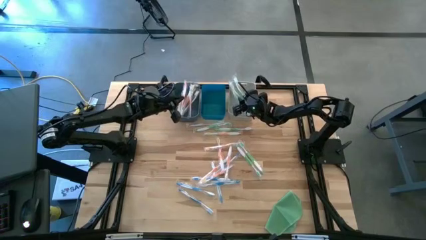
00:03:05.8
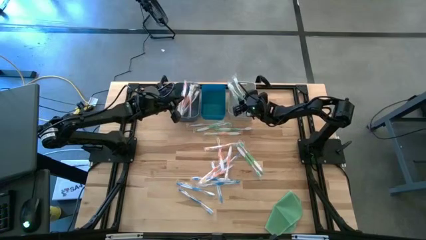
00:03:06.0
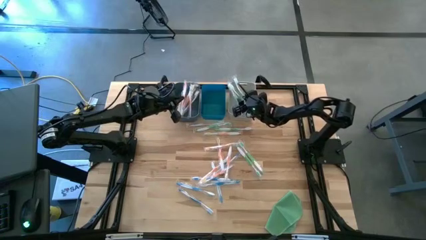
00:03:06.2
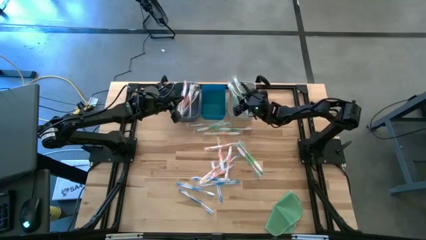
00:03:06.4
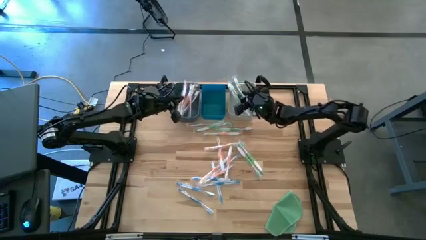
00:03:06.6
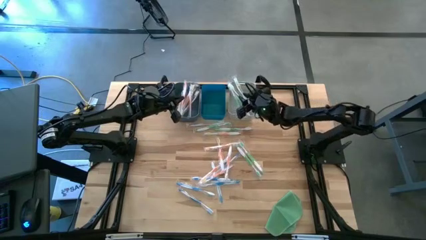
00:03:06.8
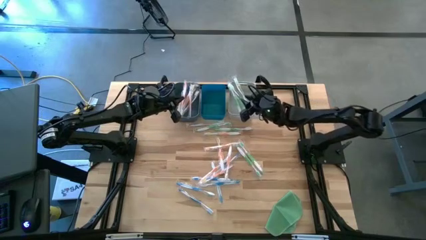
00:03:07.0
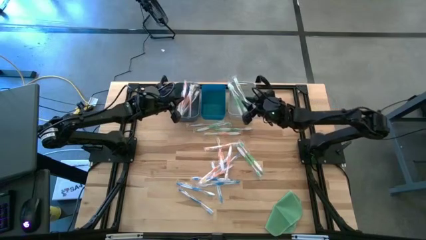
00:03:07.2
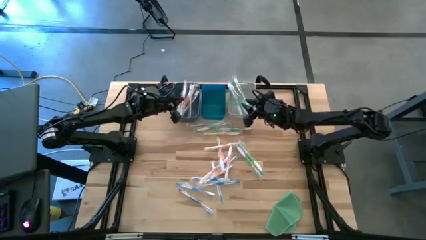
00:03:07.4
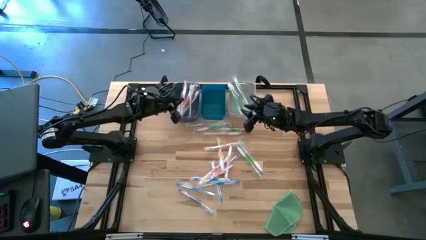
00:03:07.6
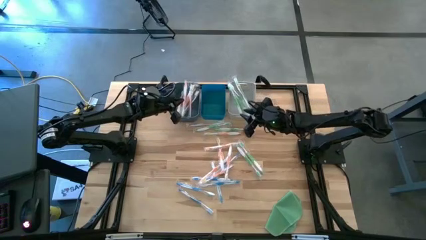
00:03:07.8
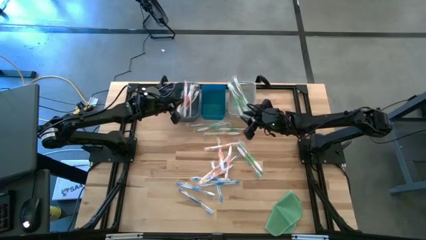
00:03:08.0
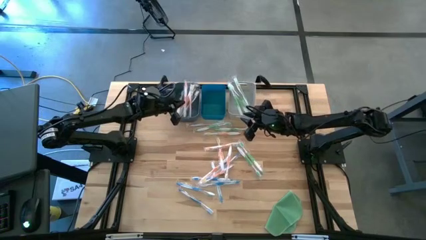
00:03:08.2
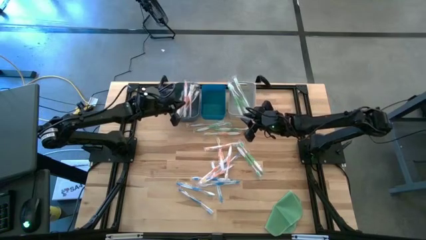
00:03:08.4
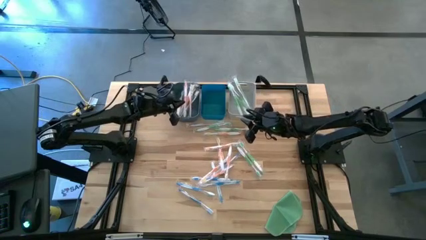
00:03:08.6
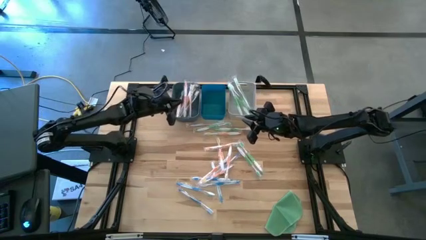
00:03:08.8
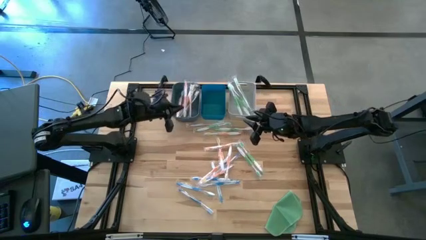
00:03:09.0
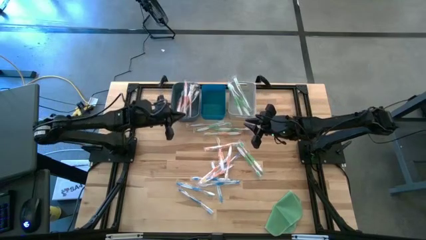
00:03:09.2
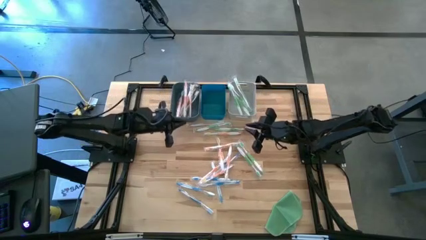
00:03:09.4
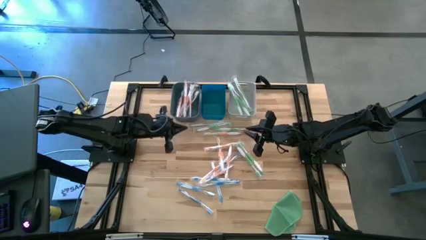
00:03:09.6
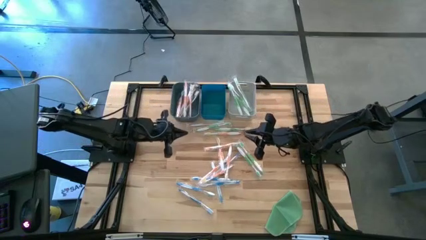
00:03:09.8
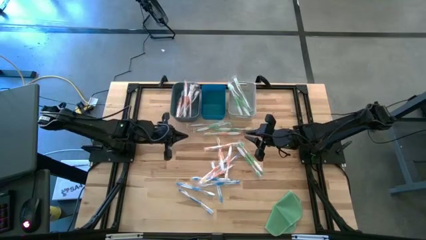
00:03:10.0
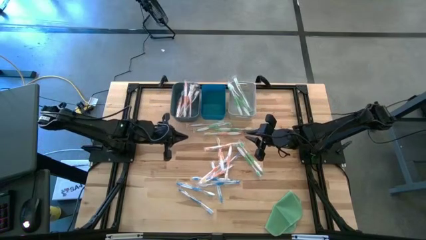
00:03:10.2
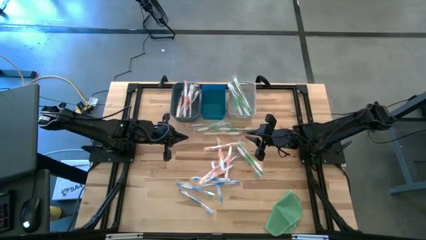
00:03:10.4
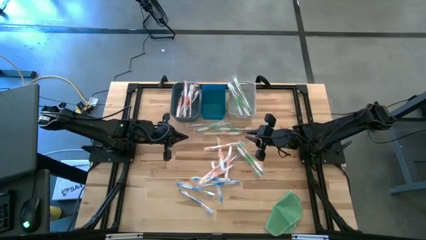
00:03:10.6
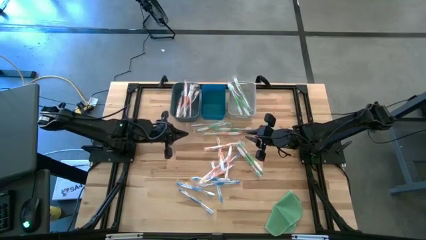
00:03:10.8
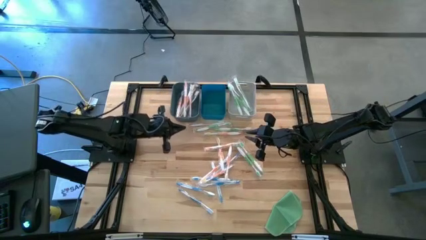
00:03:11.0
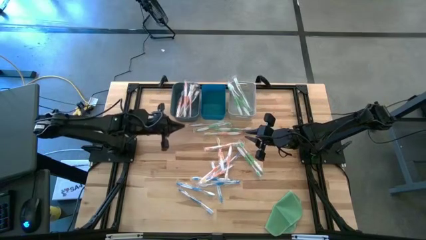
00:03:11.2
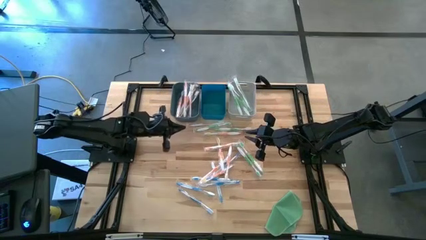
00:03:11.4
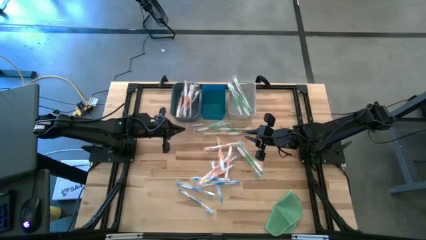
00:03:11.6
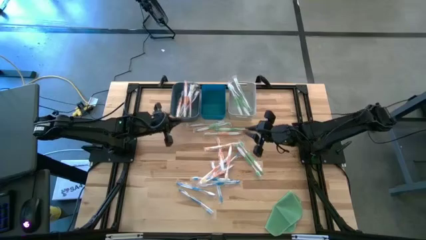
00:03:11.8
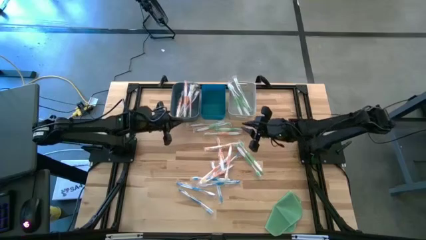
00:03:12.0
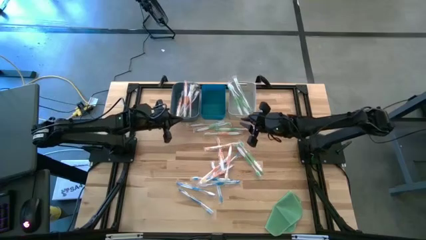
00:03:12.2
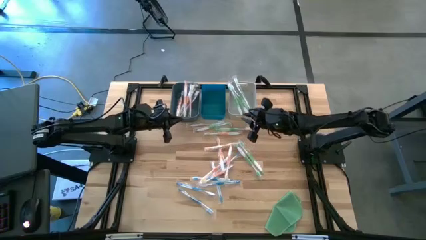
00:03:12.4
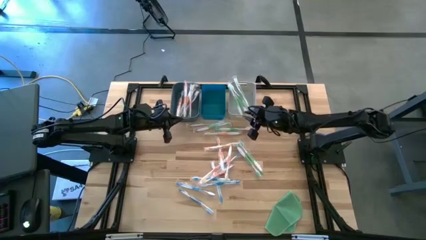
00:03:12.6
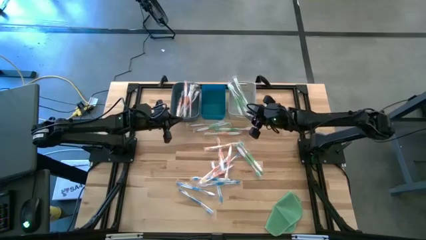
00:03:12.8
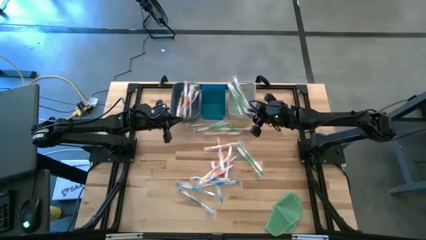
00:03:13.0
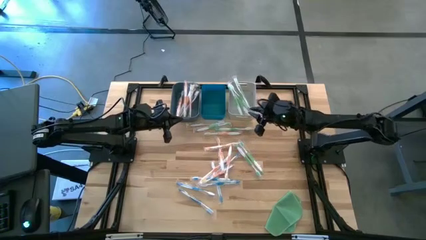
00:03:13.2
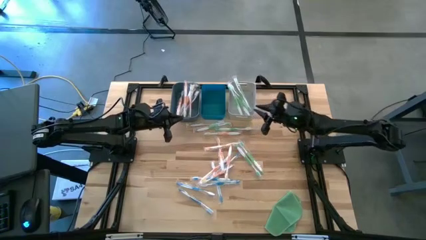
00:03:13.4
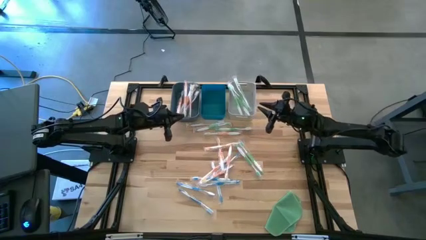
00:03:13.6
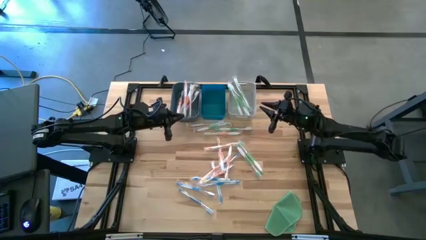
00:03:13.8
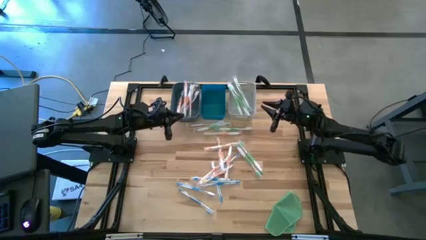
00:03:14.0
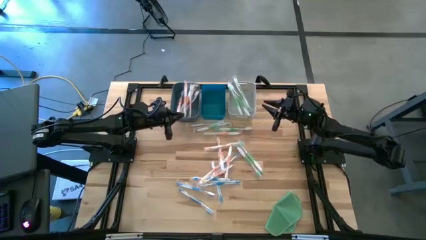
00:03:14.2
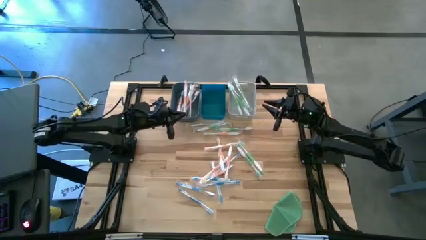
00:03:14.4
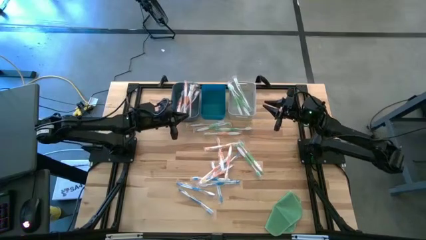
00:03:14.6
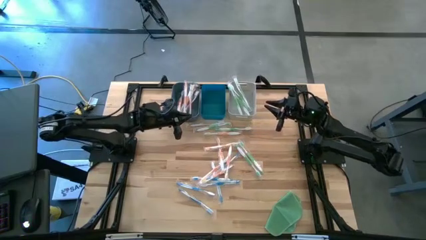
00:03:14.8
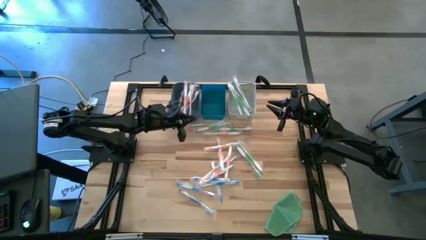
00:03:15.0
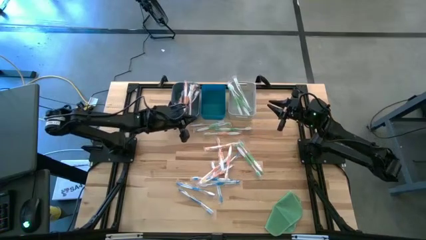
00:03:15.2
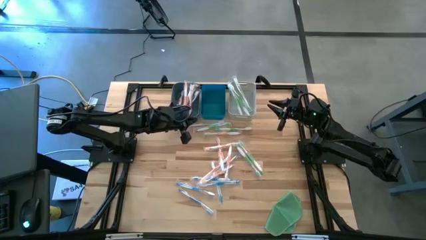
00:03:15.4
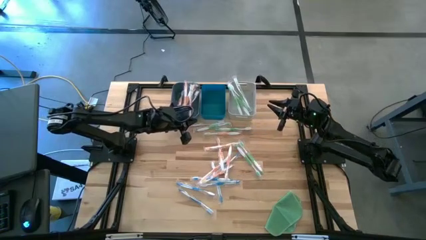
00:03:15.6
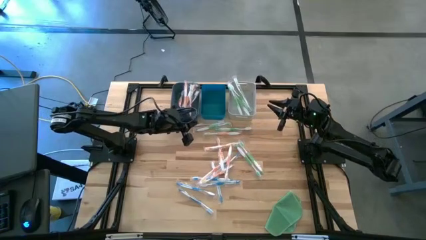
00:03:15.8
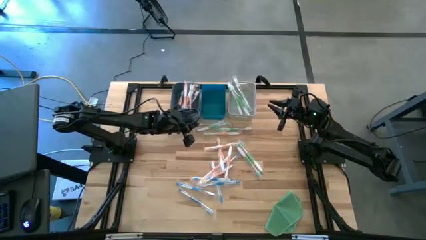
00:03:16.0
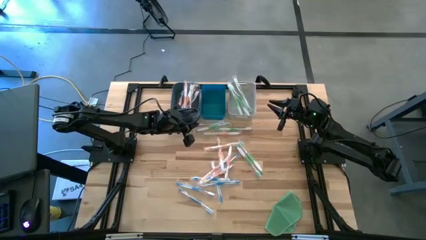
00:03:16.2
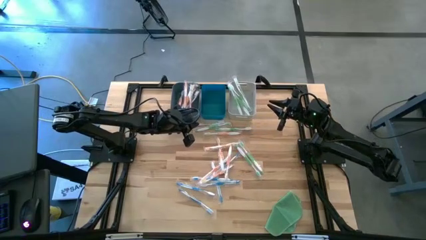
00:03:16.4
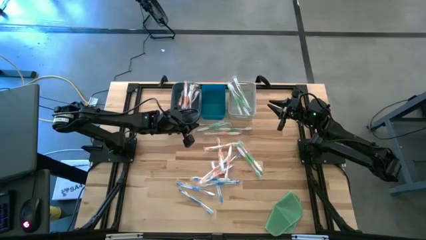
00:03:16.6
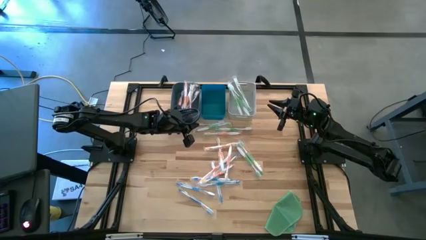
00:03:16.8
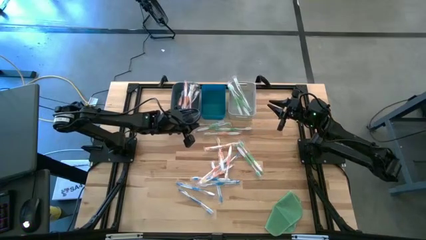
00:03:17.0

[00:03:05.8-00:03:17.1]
Task: Pick & Place Toothbrushes
Put the orange toothbrush into the dark blue bin

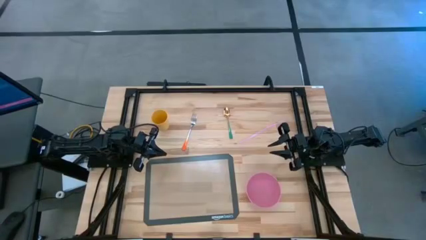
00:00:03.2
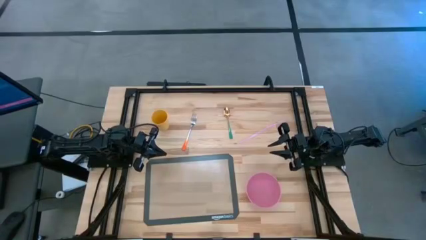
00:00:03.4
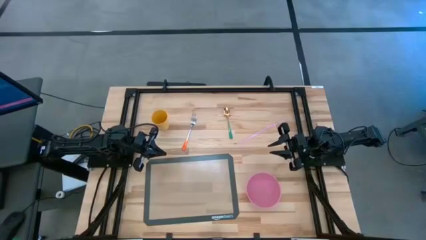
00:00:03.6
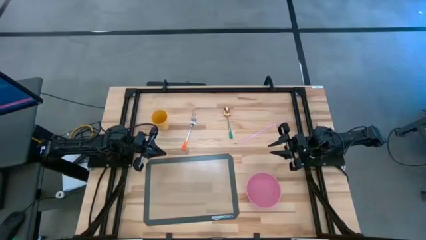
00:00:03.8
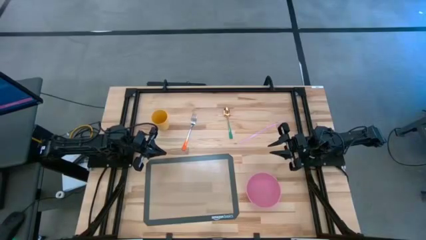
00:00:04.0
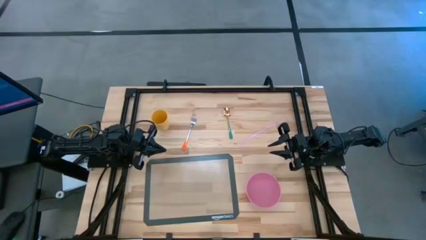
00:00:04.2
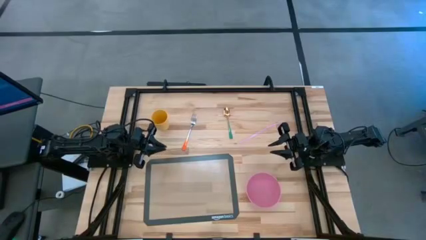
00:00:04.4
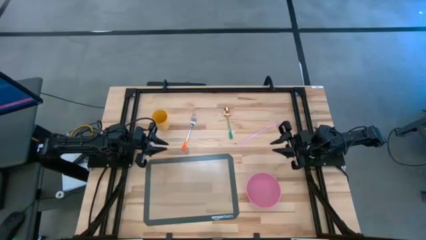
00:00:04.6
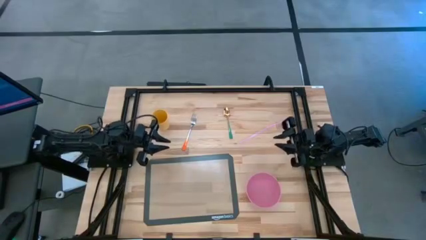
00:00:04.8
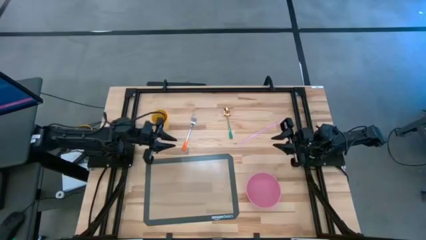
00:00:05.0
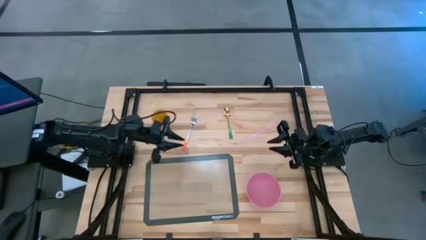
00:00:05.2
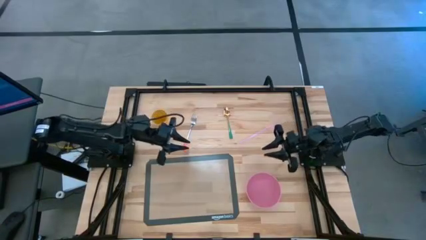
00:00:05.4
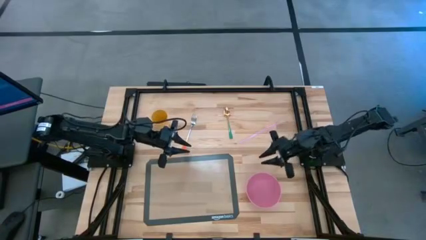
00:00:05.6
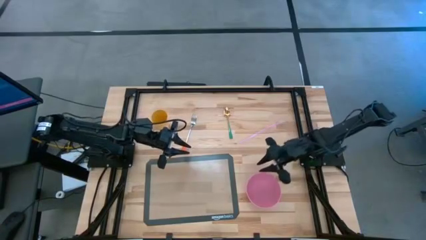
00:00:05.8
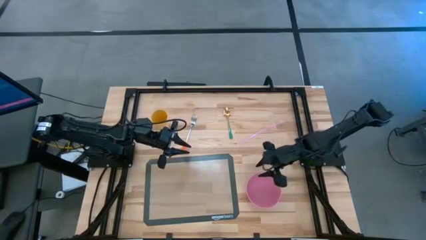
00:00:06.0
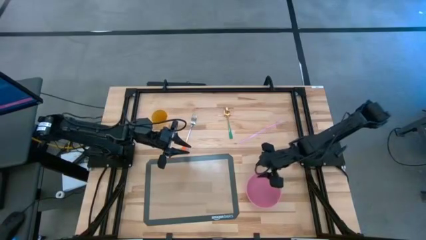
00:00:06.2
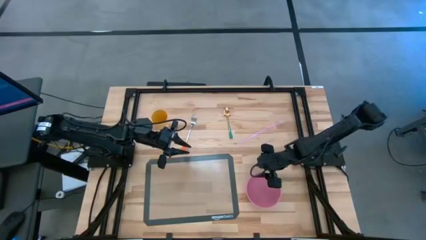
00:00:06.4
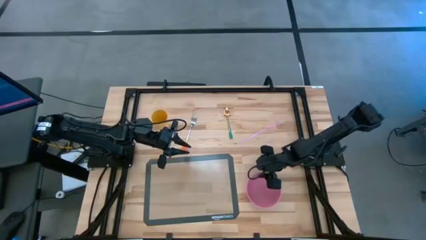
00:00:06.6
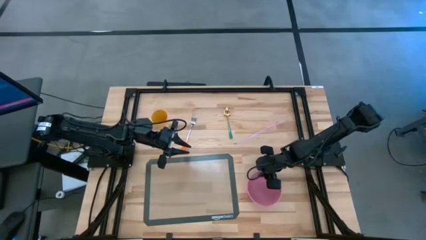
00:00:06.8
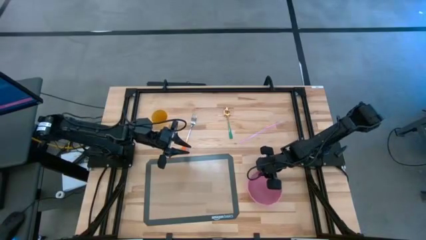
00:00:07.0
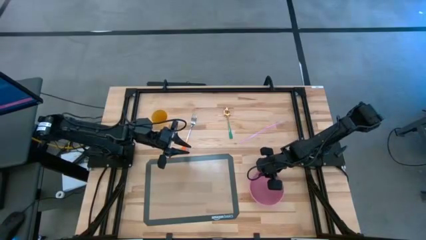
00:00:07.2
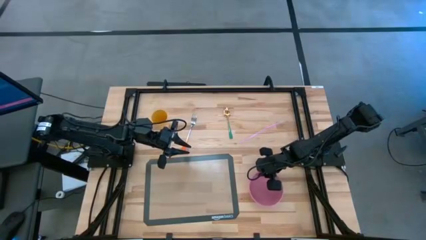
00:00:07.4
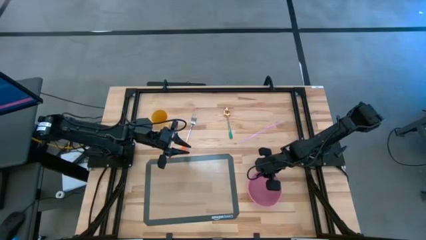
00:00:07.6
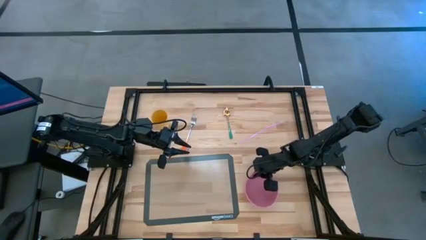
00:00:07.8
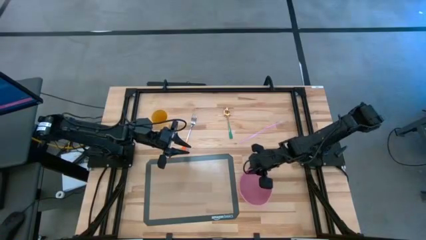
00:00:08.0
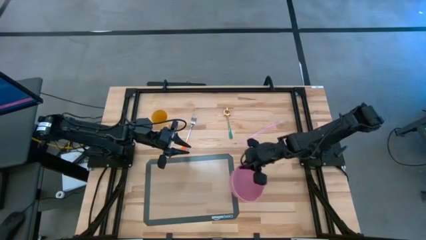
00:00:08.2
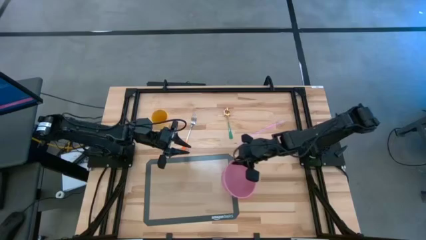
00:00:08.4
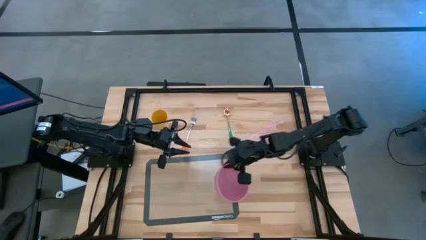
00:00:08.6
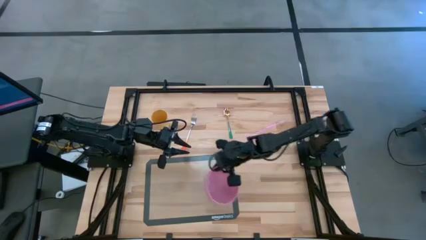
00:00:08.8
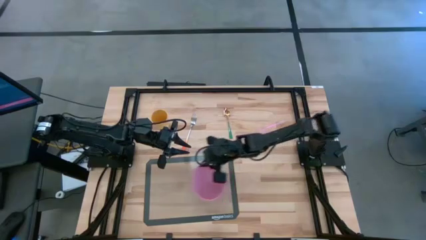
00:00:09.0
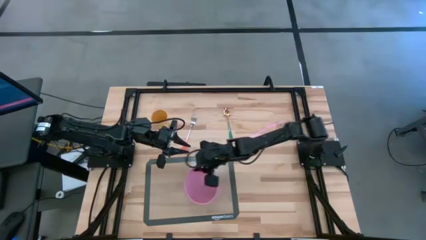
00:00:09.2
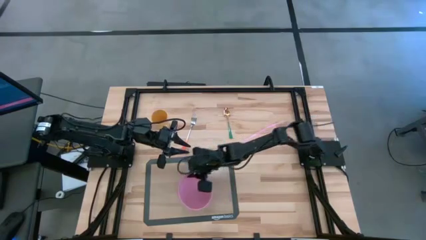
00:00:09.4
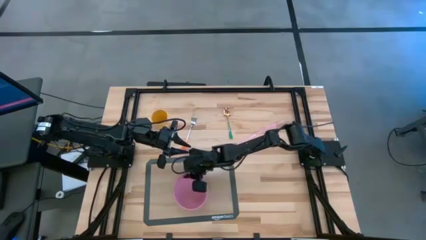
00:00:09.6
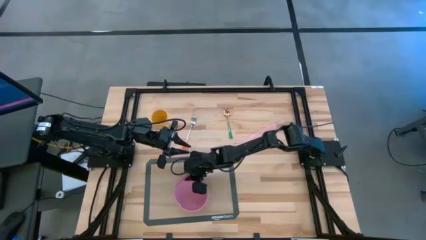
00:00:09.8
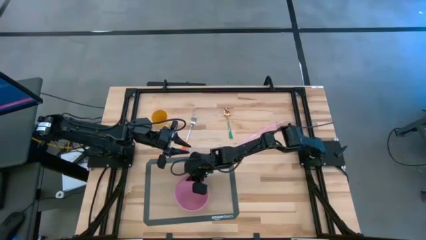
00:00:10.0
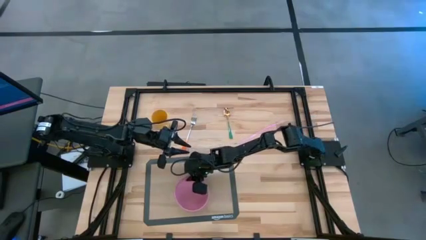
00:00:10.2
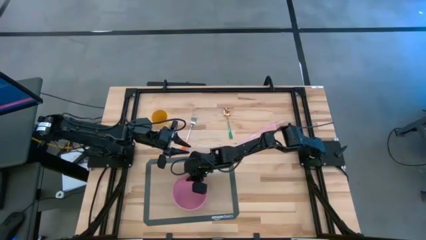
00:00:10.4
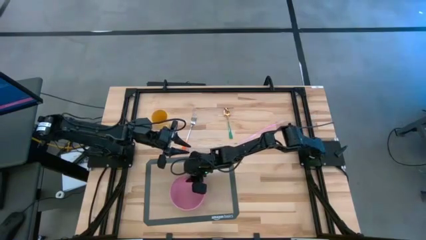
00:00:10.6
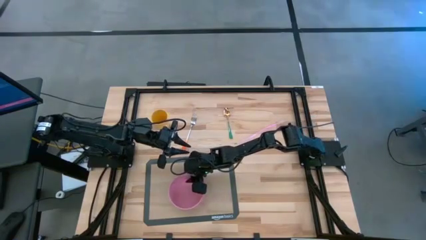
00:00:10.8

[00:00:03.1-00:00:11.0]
Task: Pick & Place Utensil
Put the pink bowl on the transparent mat
